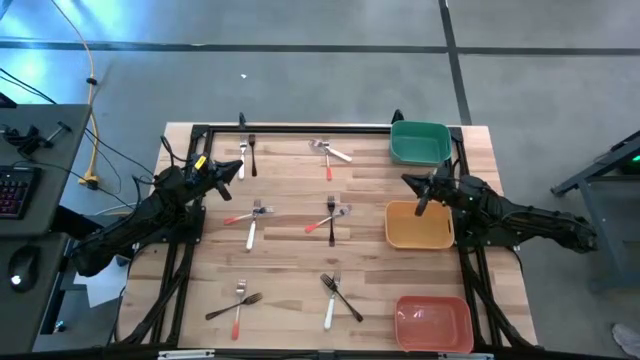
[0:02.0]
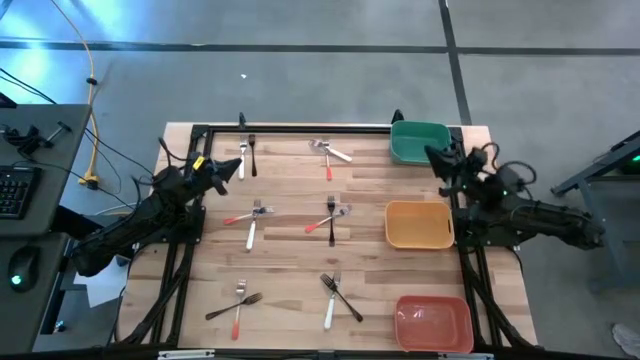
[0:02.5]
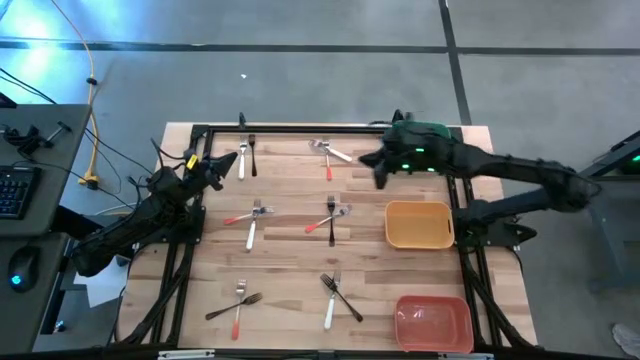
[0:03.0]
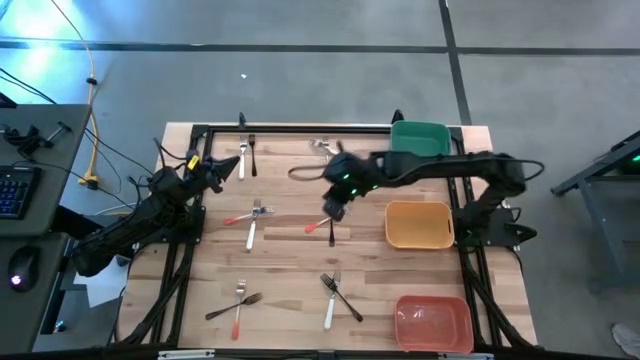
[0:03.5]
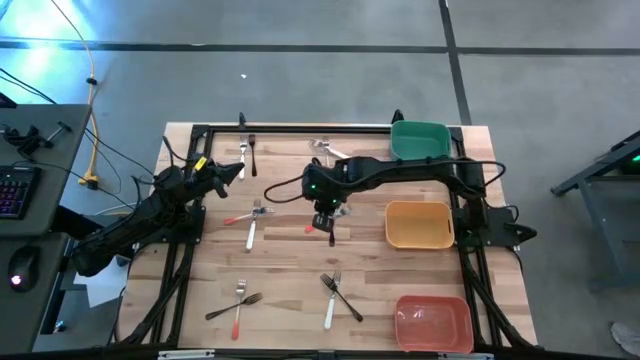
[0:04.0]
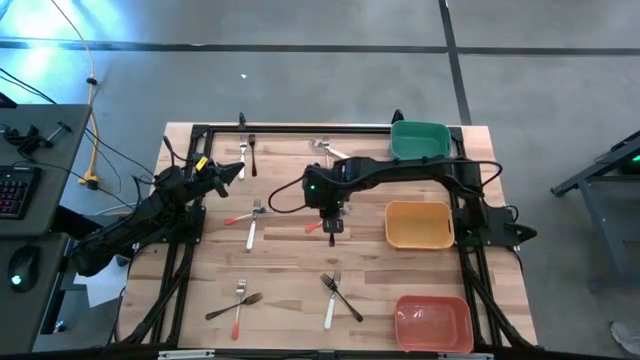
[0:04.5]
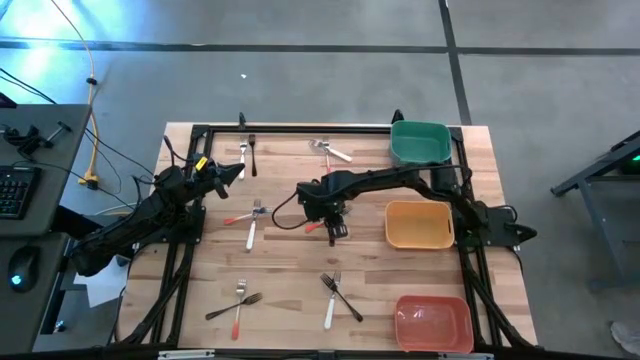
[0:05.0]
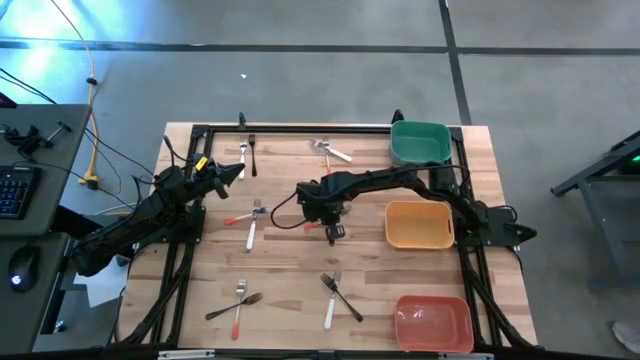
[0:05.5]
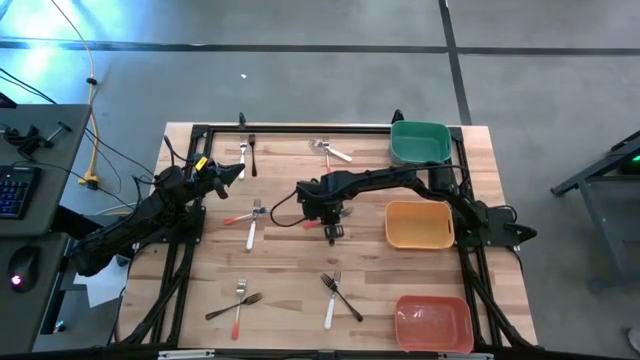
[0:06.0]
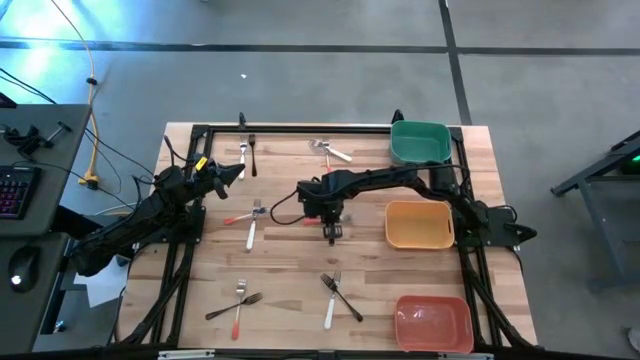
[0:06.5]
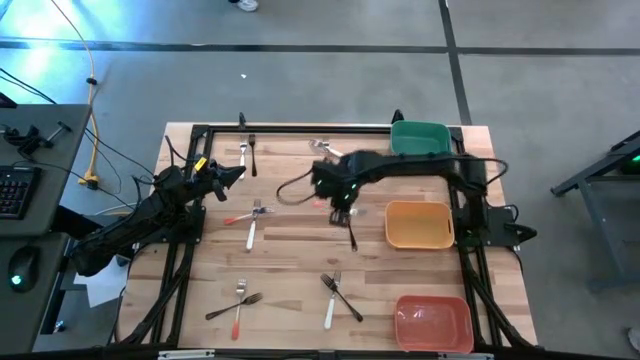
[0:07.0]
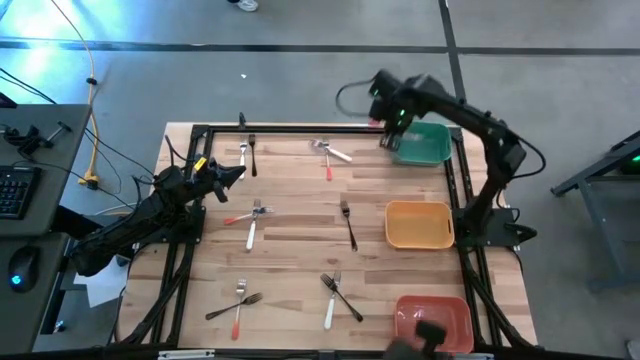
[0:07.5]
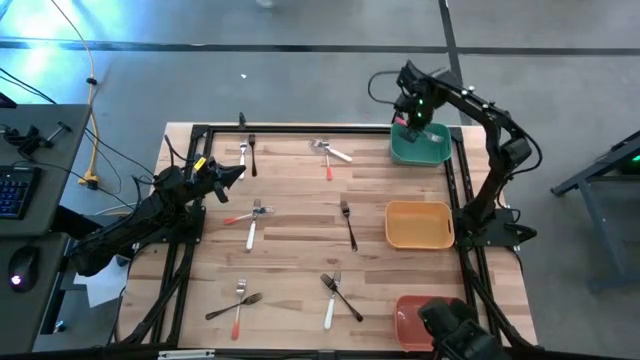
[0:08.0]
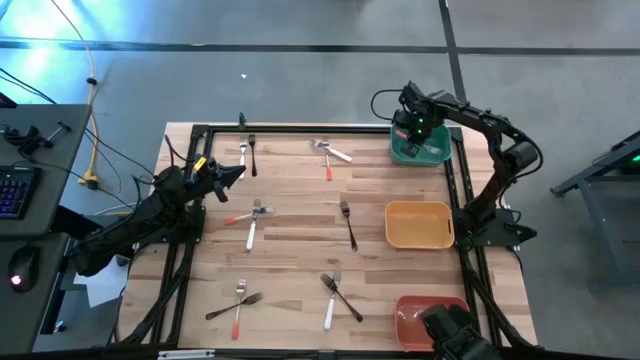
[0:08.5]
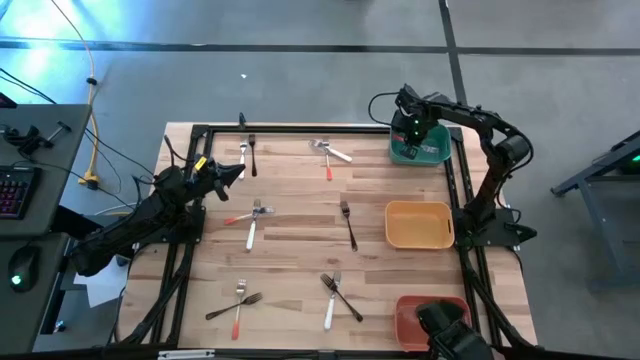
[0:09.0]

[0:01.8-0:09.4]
Task: Sort silverware by color (type)
Put the orange fork into the green bin

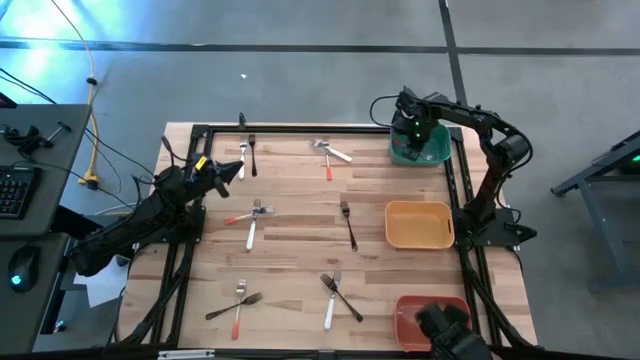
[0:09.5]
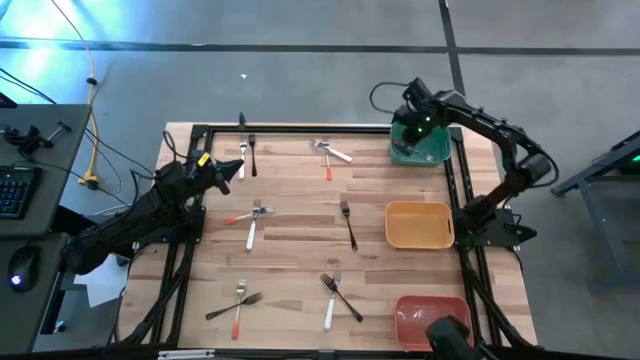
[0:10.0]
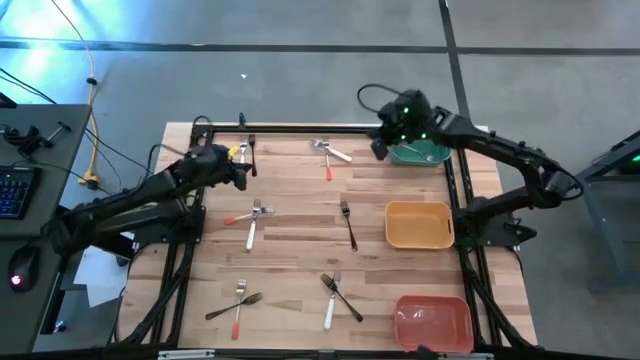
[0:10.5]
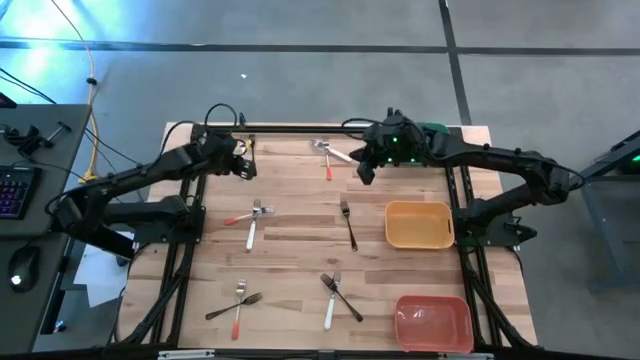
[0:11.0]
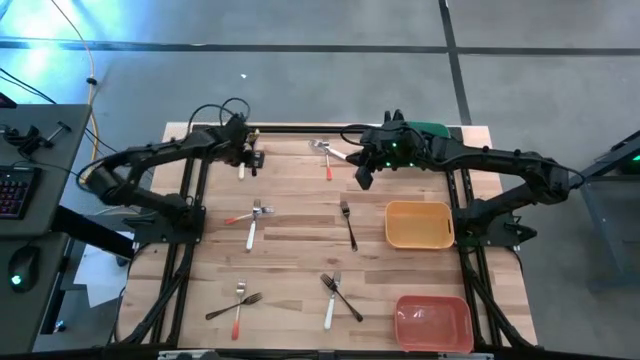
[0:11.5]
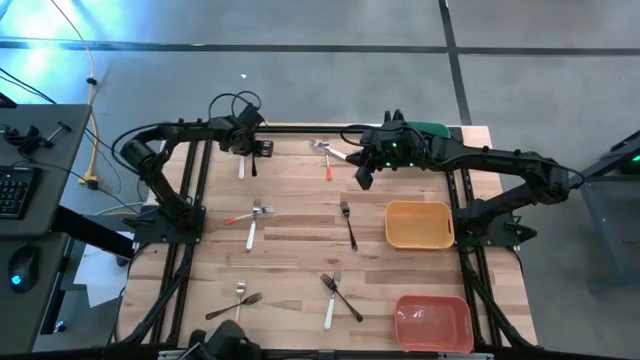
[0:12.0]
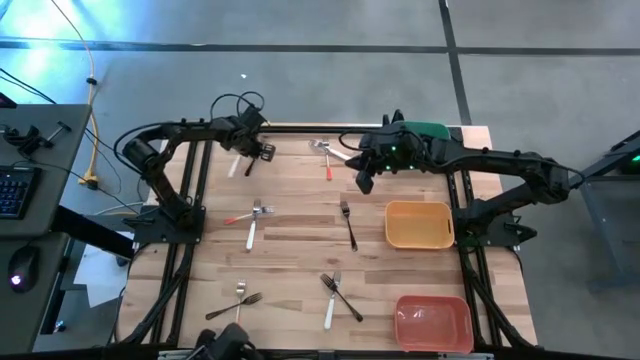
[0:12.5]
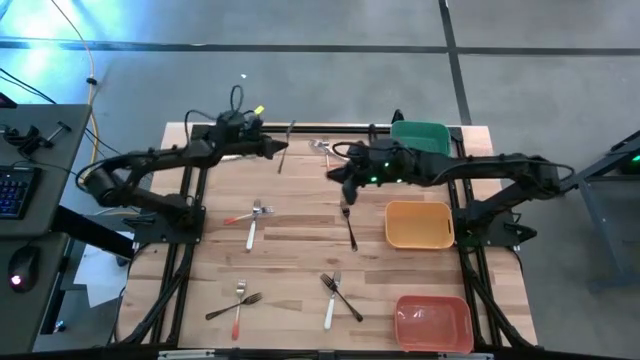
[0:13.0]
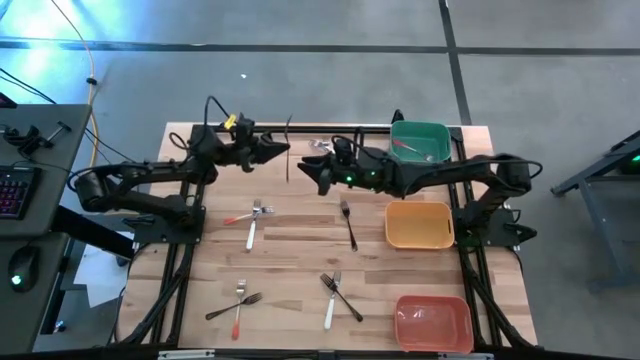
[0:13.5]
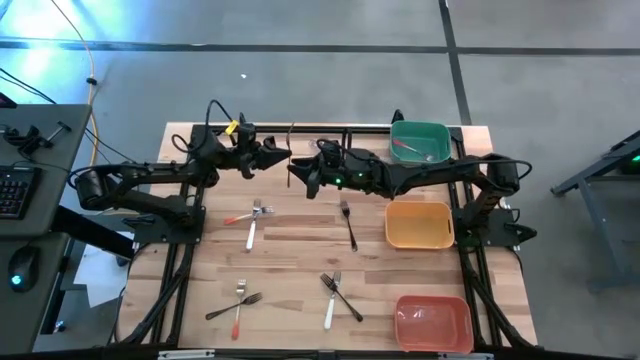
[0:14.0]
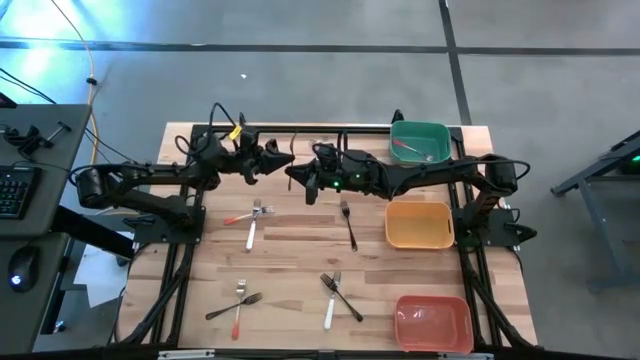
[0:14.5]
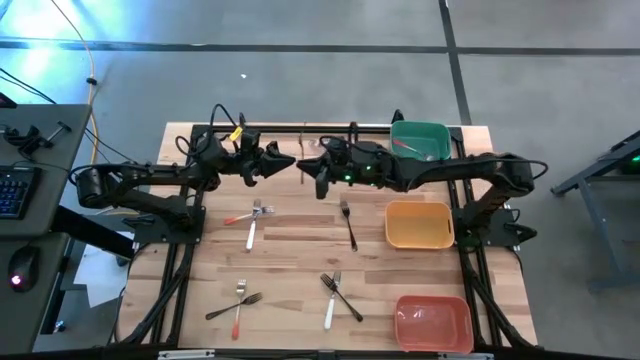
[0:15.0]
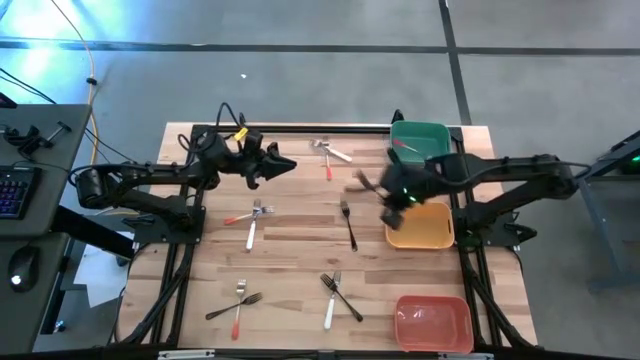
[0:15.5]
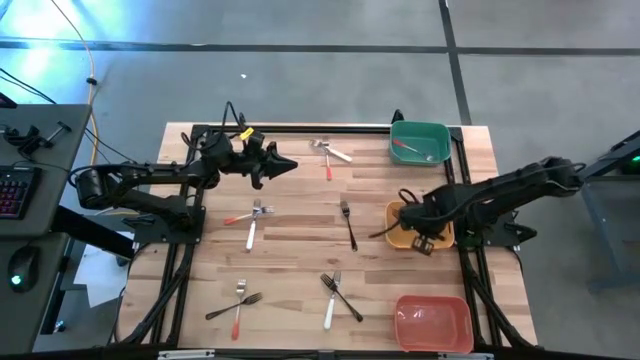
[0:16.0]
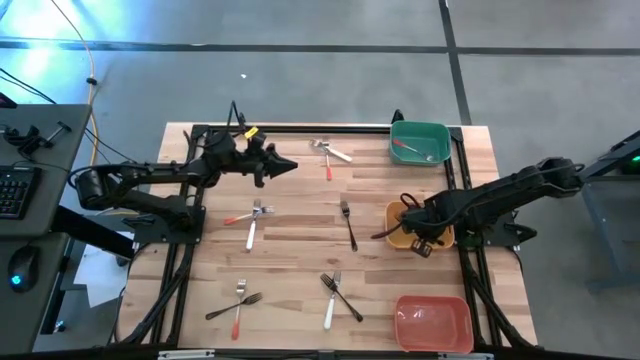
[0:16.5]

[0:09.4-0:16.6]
Put the black fork into the yellow bin

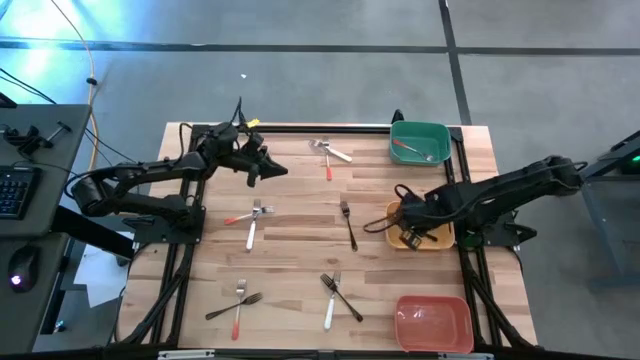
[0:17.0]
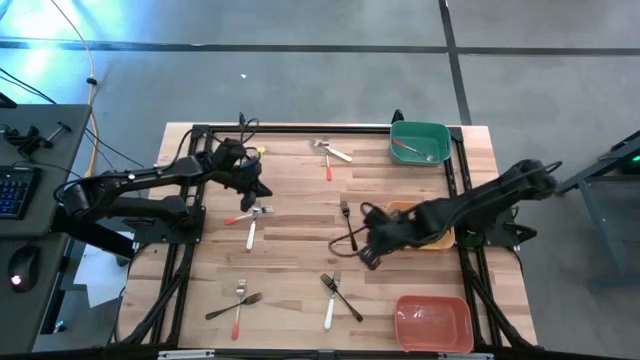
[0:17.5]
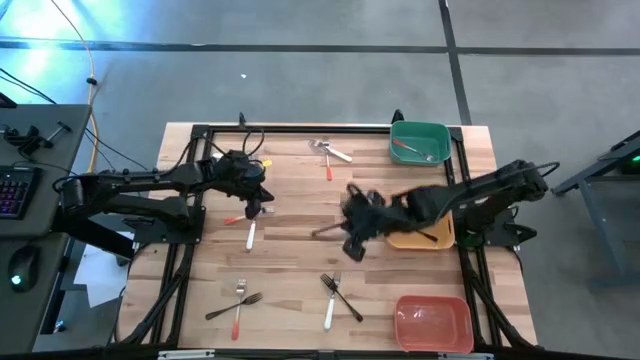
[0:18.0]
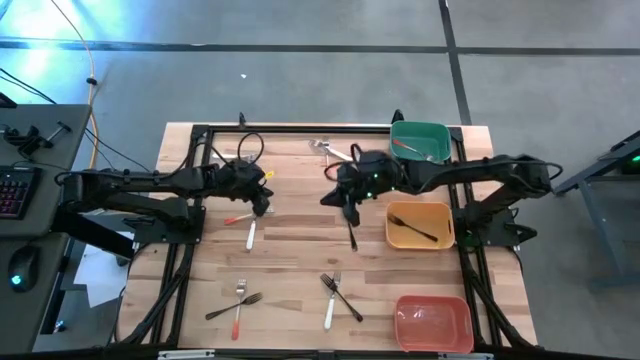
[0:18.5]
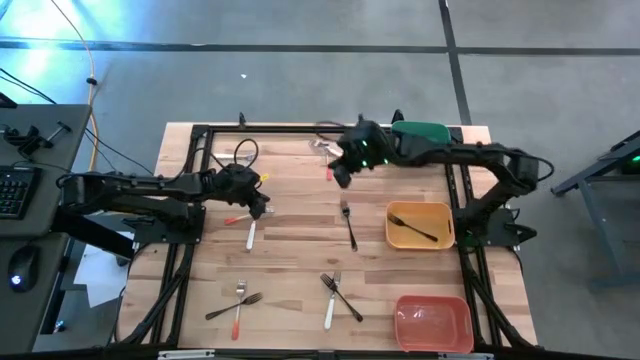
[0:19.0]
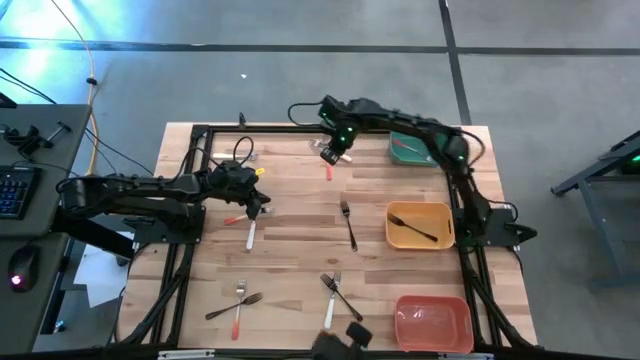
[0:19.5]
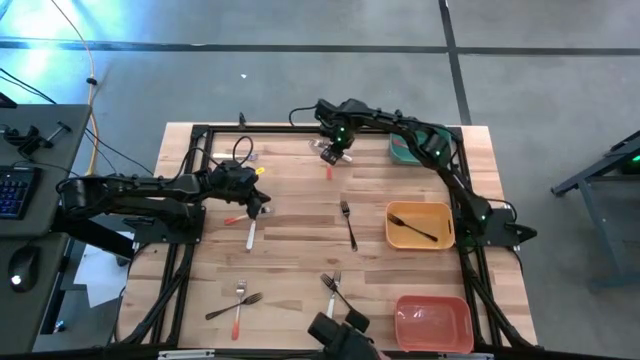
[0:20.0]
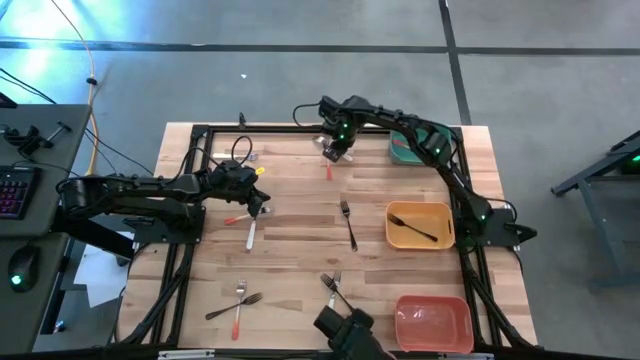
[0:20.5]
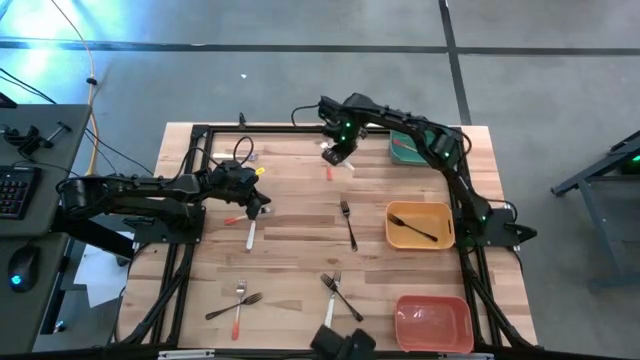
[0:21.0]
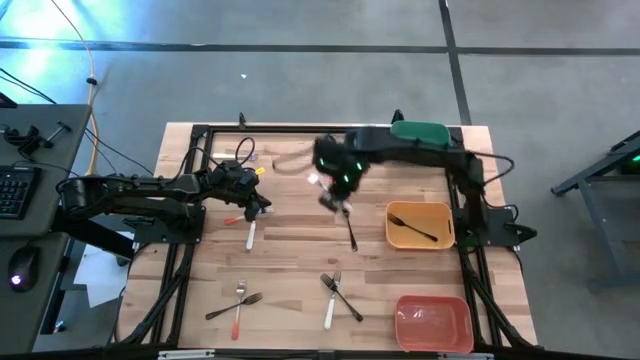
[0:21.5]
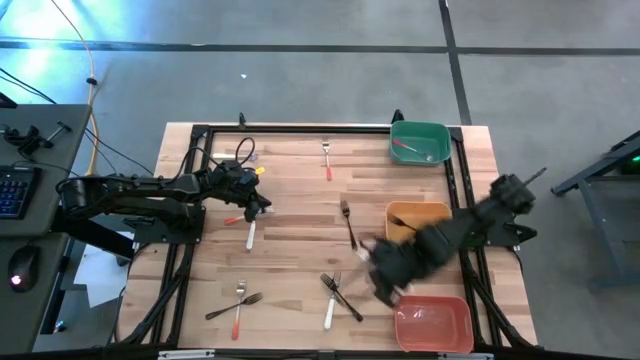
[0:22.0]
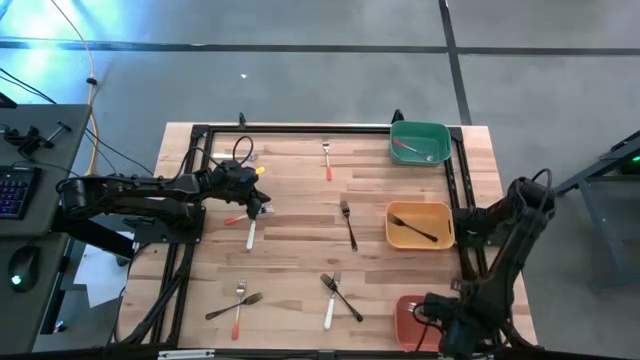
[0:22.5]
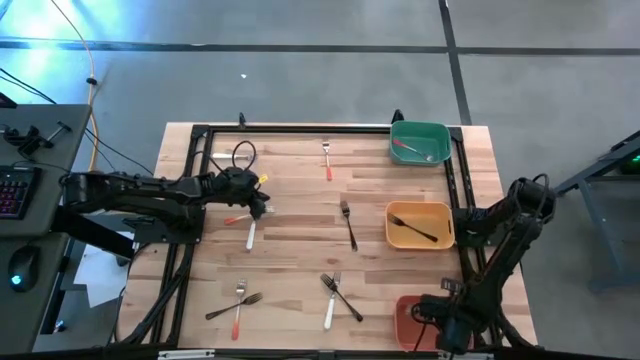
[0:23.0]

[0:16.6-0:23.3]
Put the white fork into the orange bin

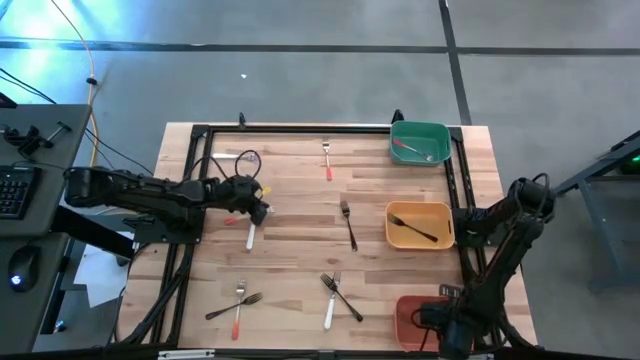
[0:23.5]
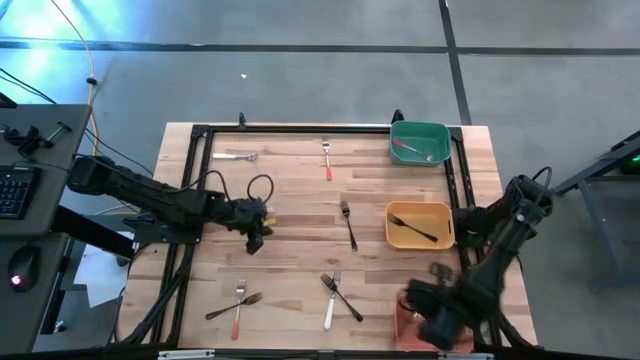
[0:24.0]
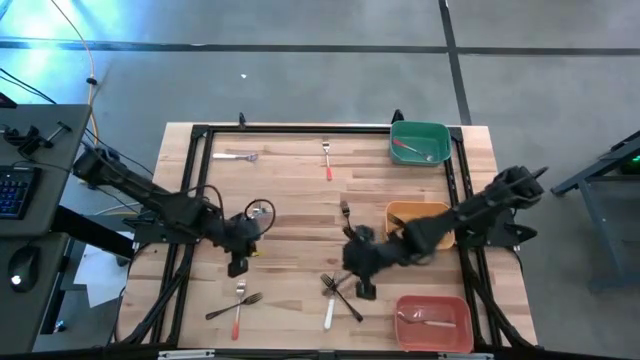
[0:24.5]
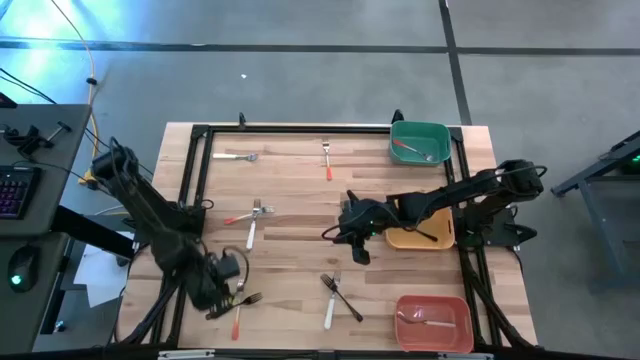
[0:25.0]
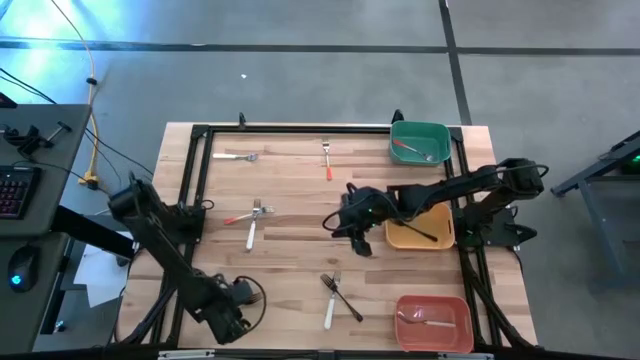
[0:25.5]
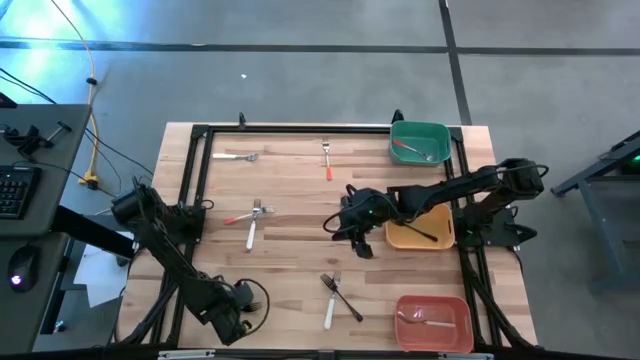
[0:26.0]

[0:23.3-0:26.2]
Put the black fork into the yellow bin
